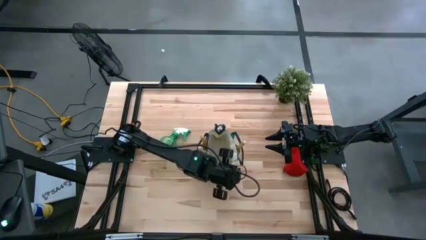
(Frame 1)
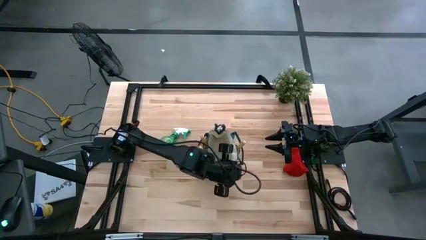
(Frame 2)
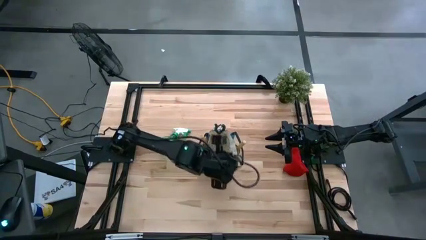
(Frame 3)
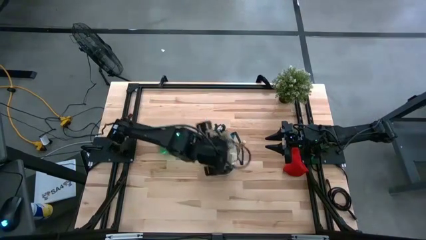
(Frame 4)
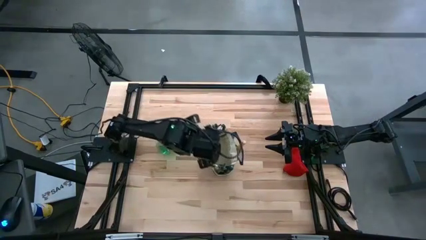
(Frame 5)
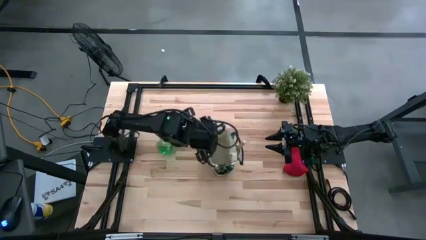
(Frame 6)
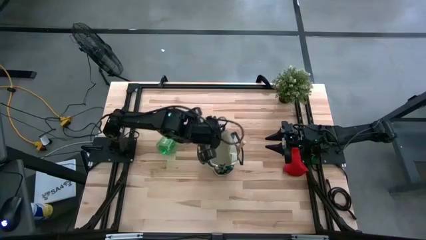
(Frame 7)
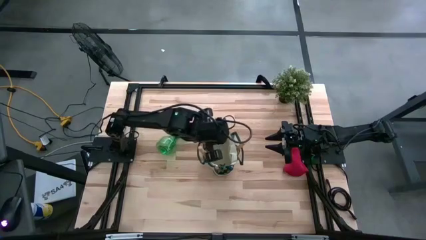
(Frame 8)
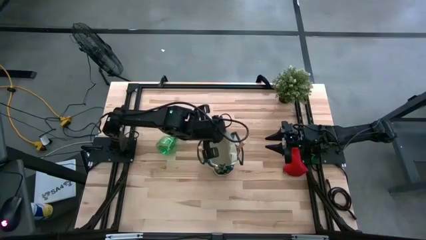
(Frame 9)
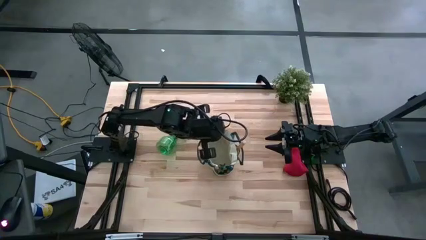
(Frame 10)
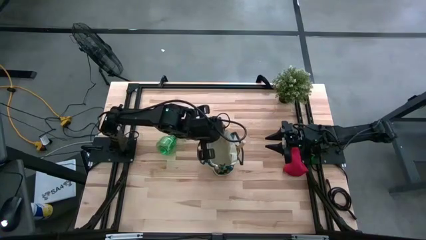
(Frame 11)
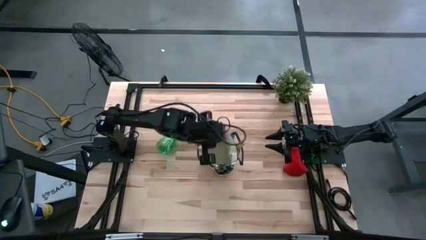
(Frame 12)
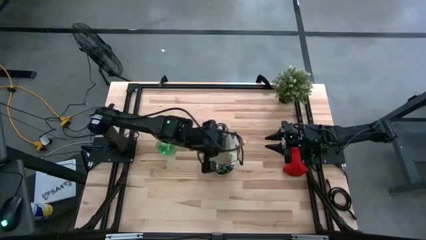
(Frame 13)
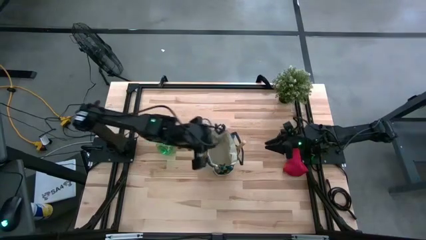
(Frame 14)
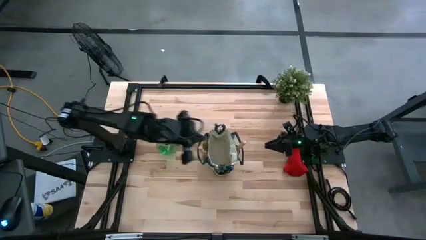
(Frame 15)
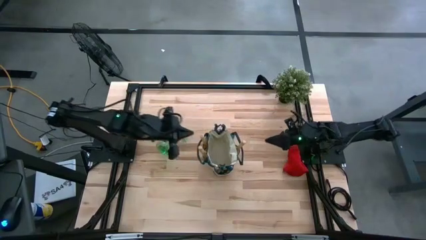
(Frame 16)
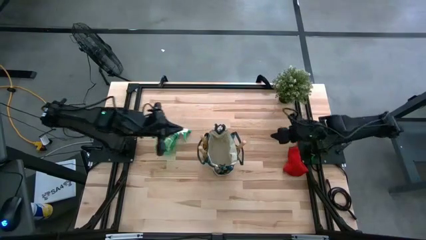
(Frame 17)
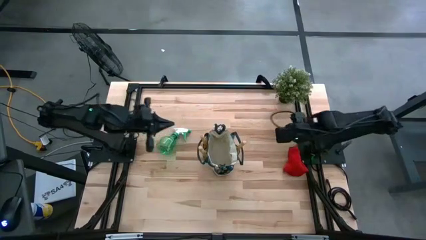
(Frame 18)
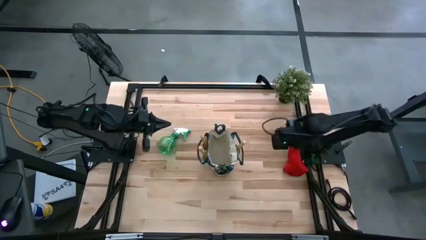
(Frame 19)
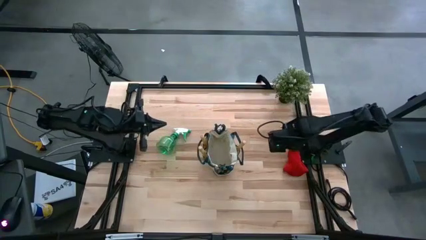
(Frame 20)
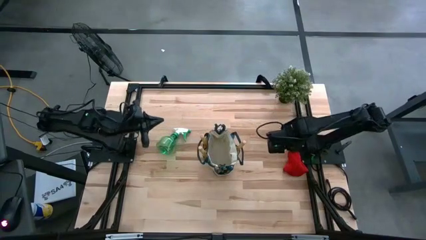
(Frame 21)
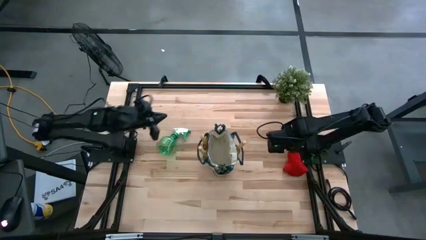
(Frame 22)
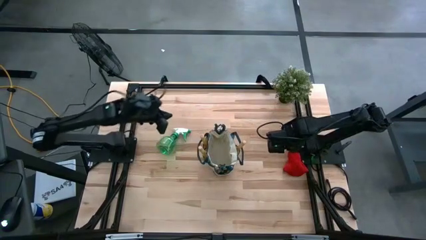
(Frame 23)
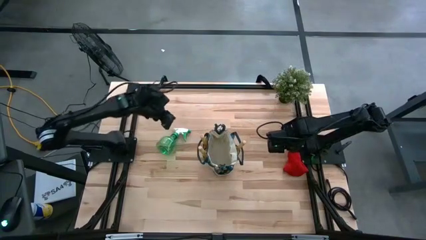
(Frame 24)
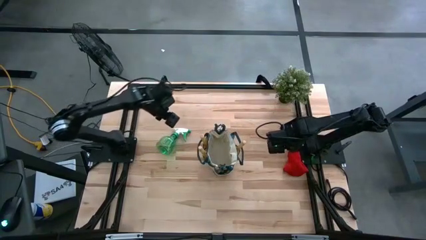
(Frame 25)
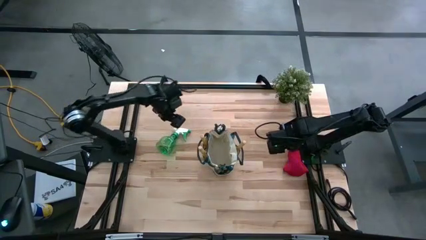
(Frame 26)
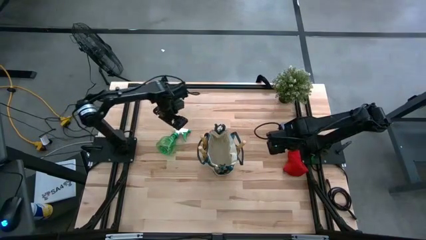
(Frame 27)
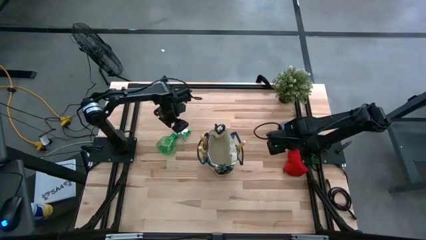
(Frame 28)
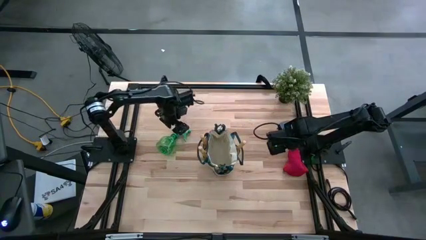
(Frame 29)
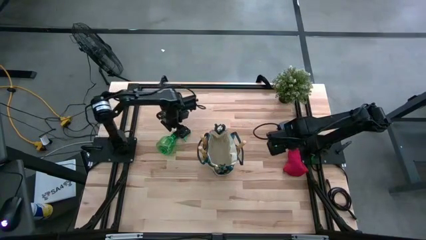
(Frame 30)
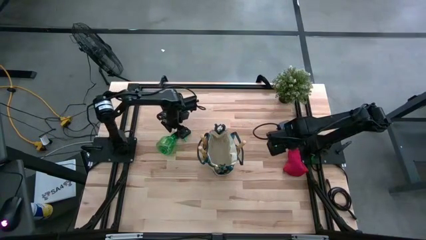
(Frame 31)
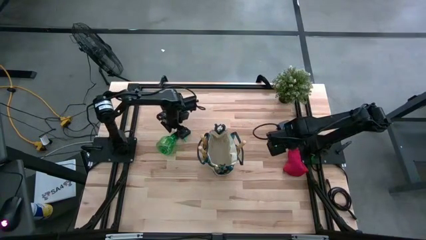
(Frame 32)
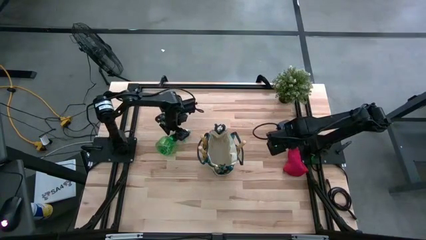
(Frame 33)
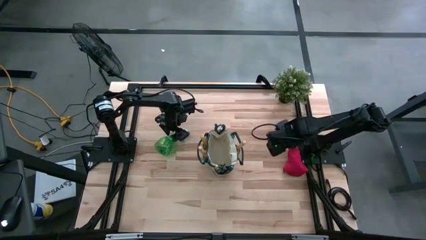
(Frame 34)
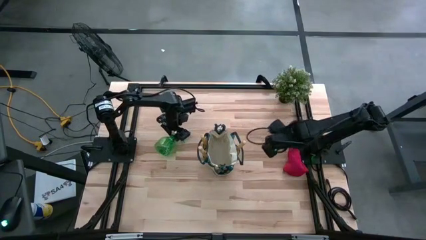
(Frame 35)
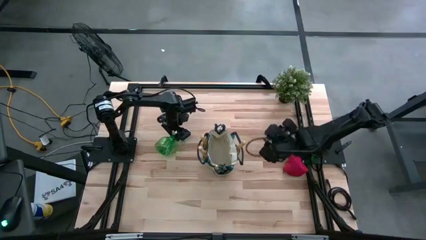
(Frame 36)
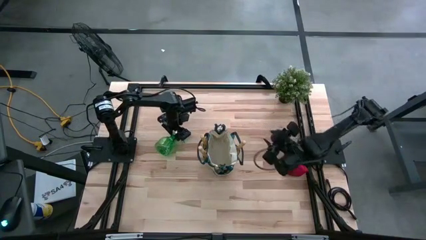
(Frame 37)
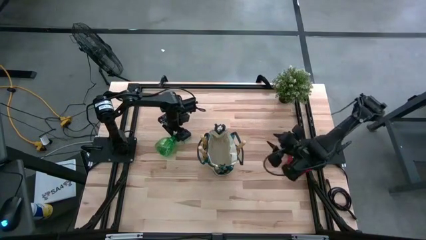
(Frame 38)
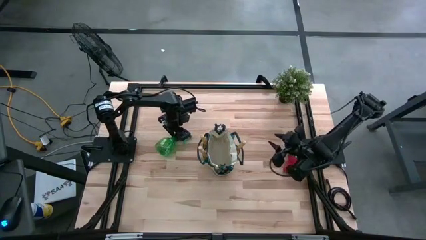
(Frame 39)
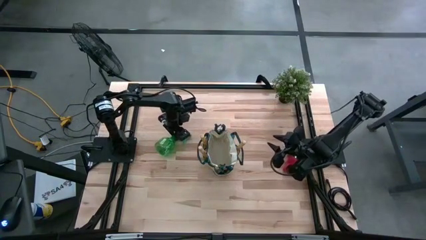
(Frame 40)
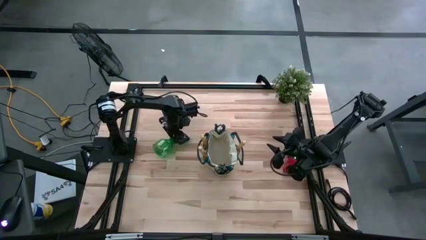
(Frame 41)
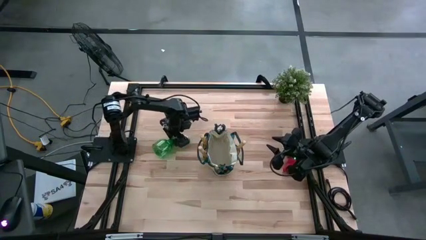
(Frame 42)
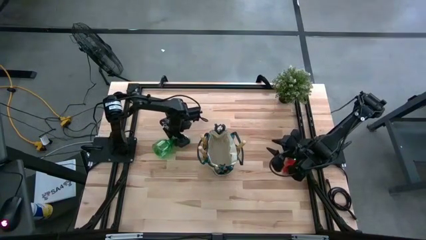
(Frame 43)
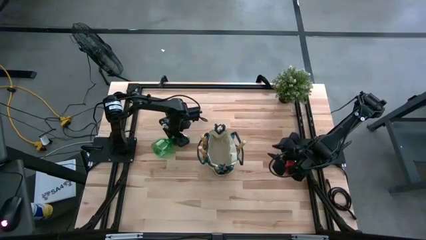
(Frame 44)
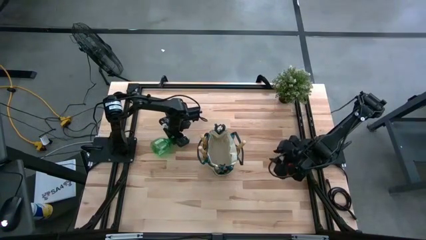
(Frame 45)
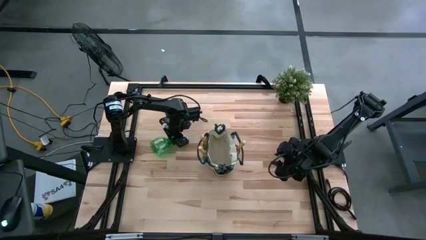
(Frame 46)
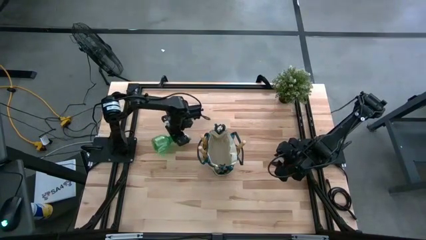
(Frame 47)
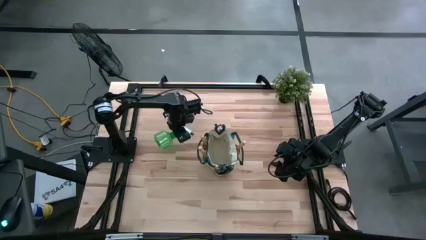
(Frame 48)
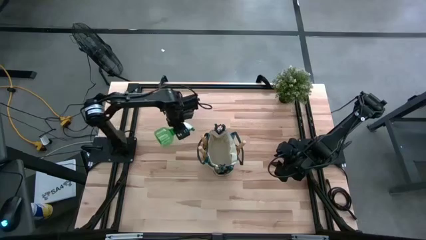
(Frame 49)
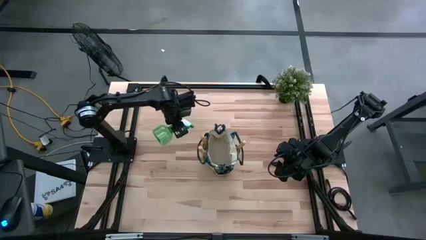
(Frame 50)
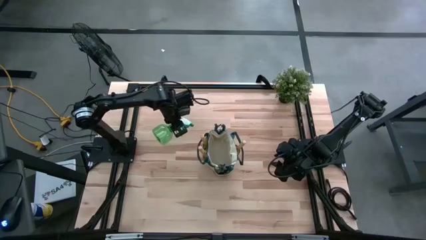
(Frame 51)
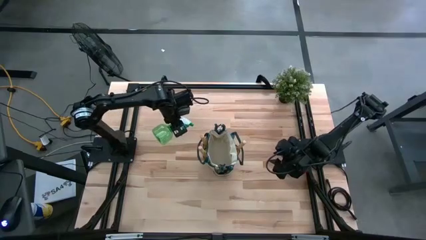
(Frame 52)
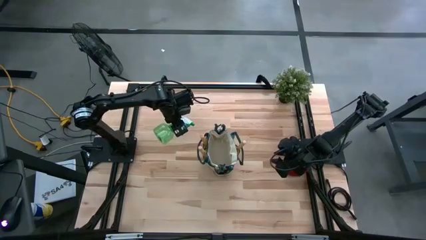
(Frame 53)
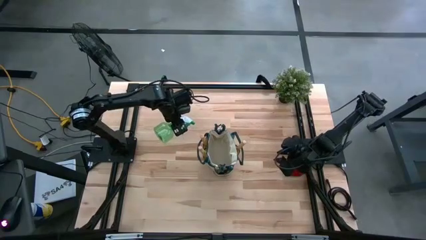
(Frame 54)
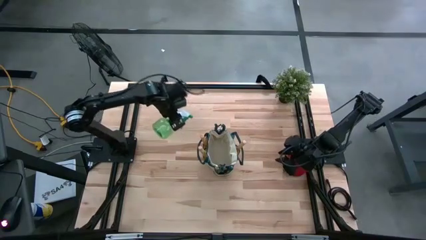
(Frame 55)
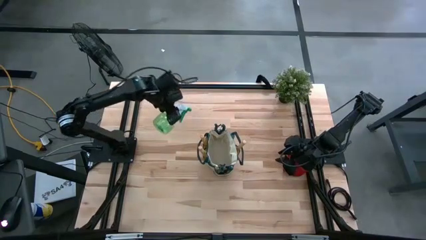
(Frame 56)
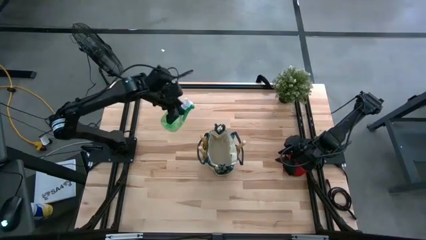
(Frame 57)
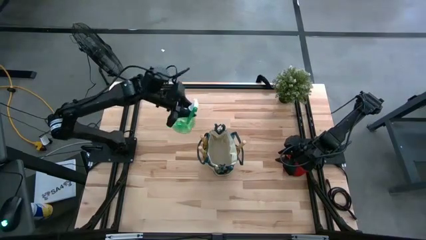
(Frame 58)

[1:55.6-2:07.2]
Task: Pick & Place Garden tools in Gardening bag
Put the green spray bottle into the white gardening bag
